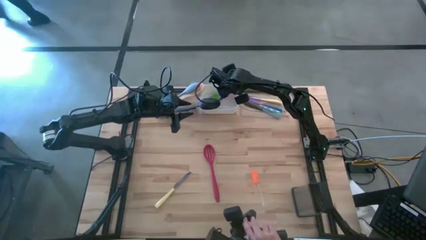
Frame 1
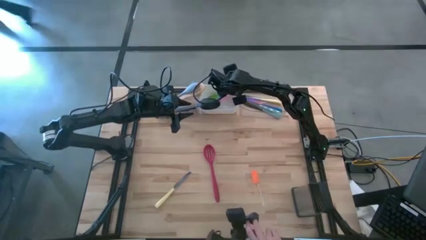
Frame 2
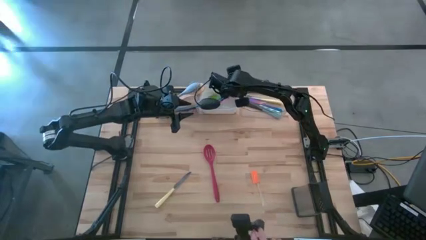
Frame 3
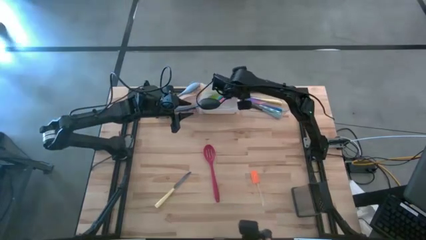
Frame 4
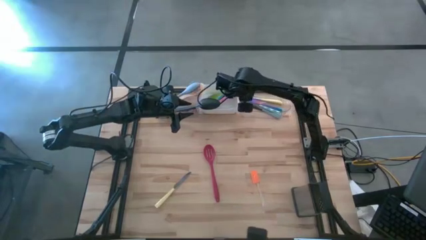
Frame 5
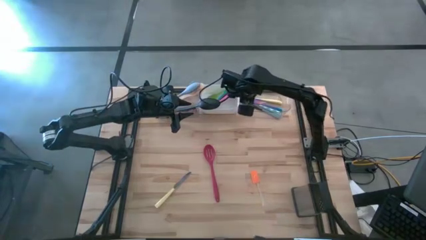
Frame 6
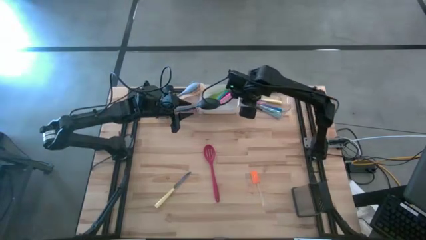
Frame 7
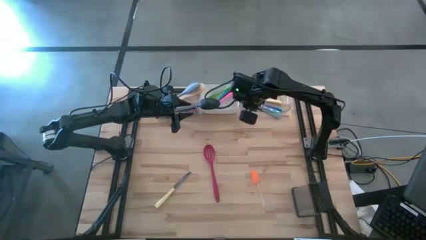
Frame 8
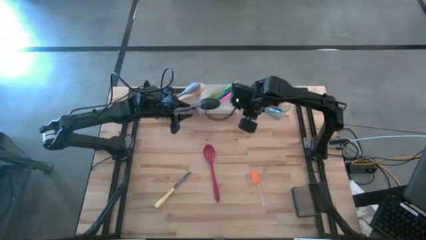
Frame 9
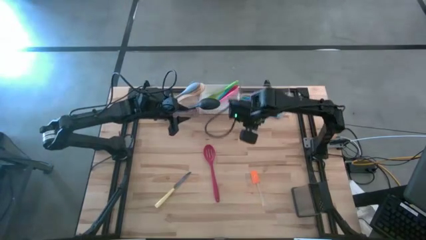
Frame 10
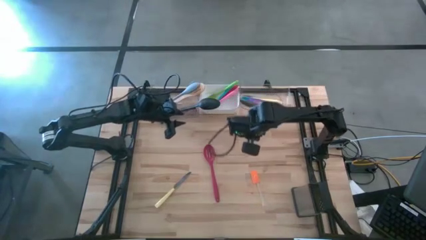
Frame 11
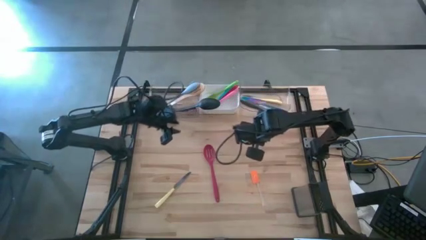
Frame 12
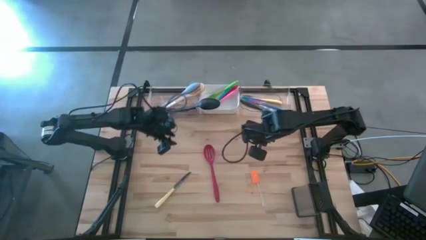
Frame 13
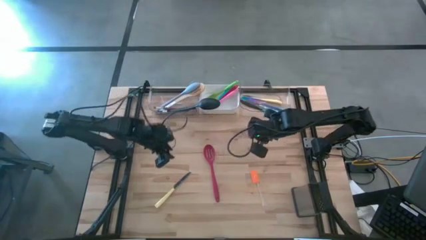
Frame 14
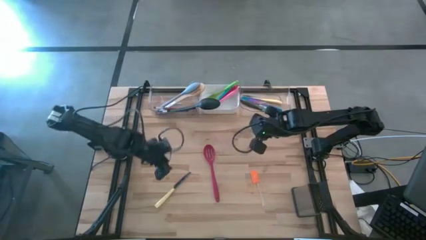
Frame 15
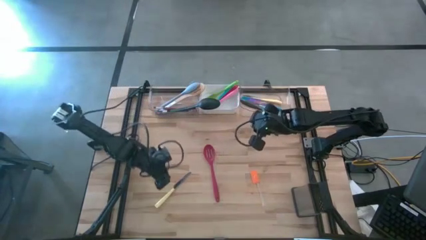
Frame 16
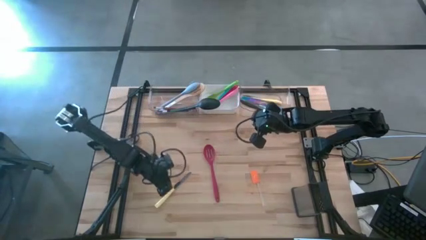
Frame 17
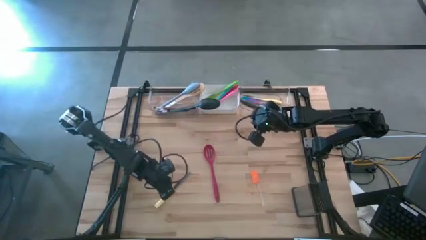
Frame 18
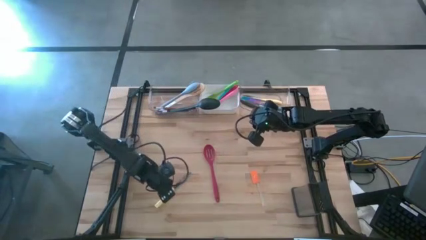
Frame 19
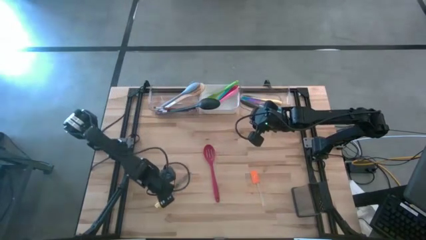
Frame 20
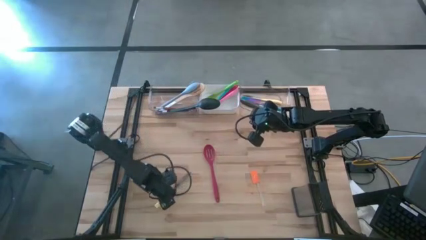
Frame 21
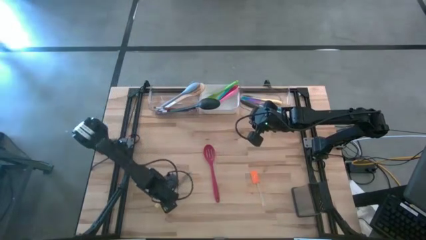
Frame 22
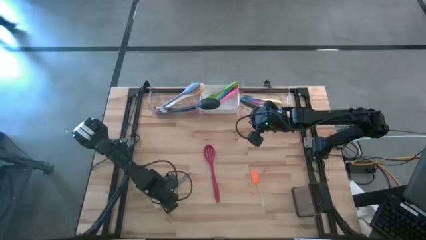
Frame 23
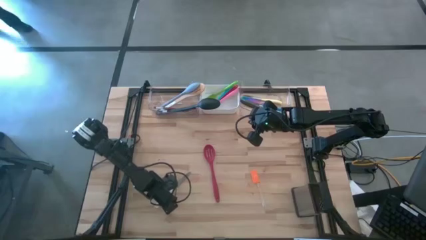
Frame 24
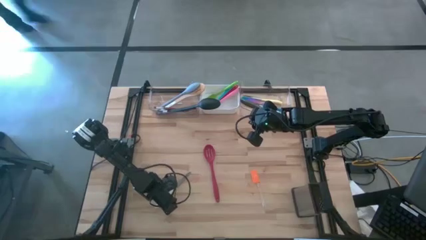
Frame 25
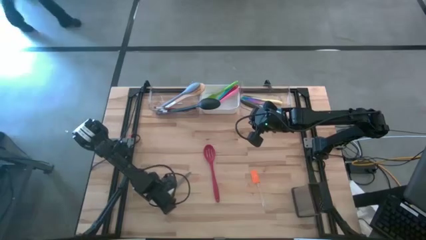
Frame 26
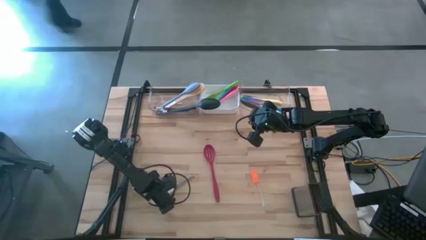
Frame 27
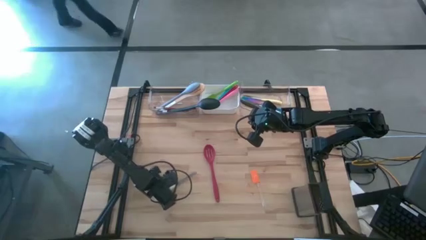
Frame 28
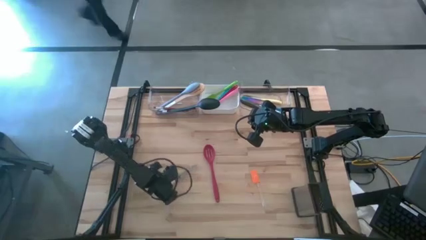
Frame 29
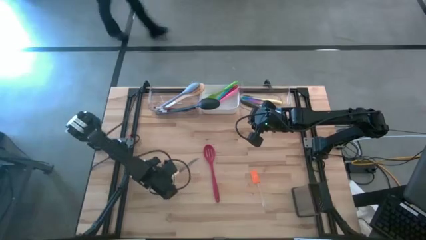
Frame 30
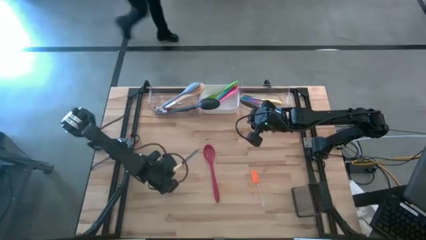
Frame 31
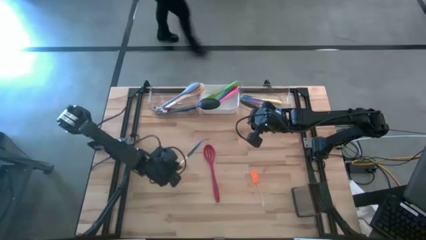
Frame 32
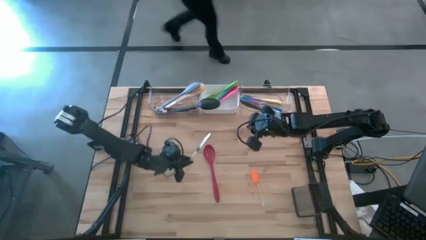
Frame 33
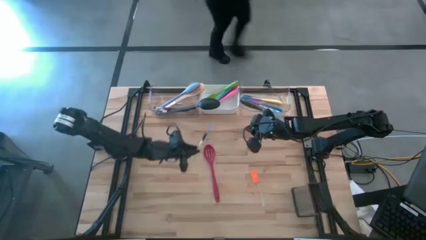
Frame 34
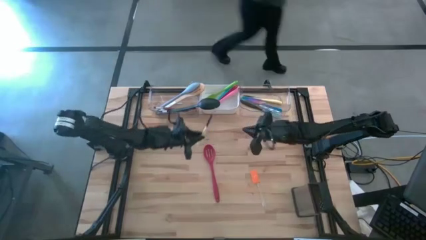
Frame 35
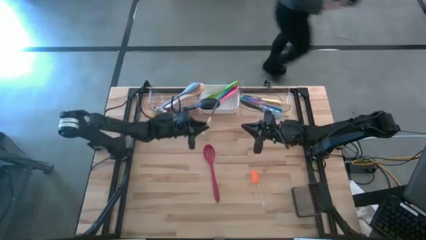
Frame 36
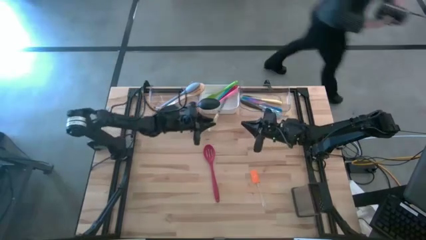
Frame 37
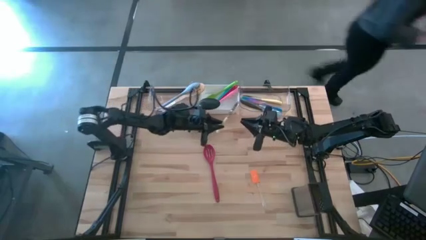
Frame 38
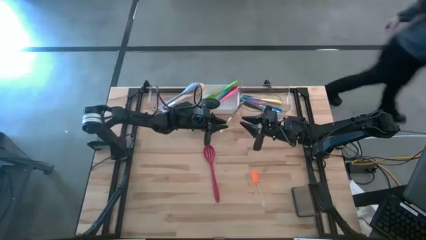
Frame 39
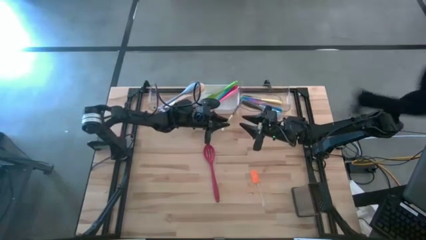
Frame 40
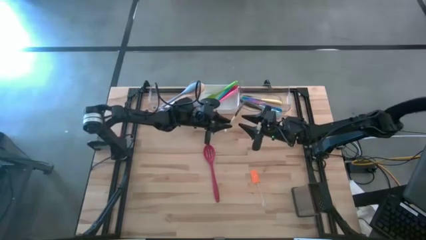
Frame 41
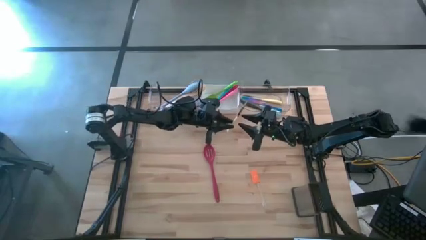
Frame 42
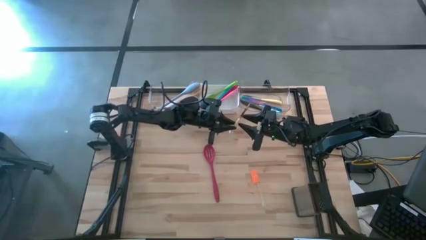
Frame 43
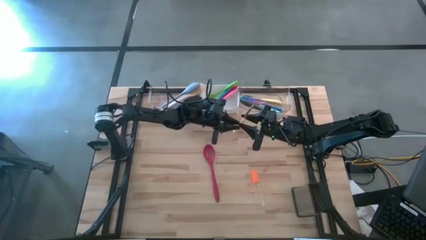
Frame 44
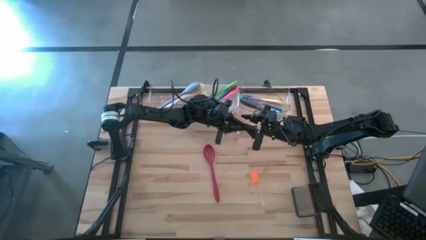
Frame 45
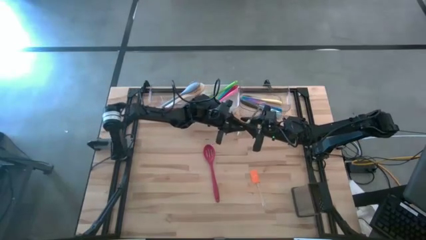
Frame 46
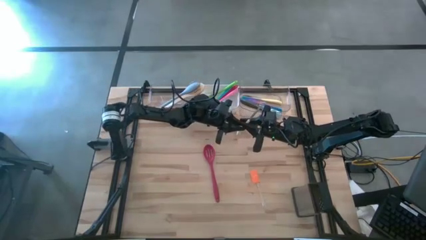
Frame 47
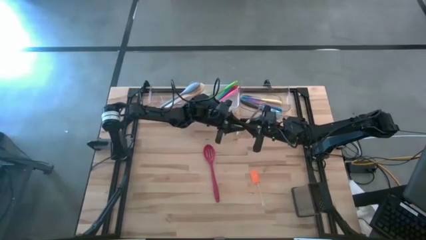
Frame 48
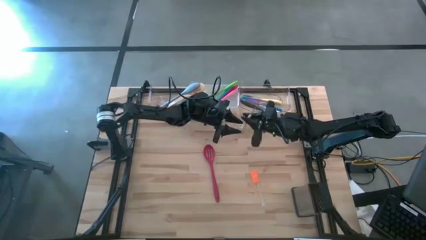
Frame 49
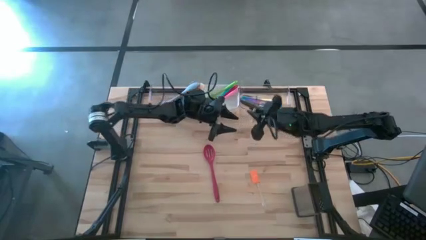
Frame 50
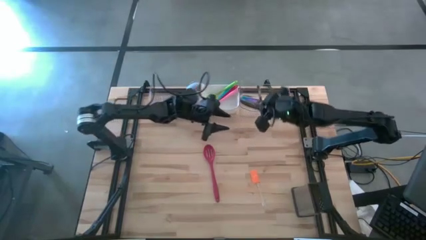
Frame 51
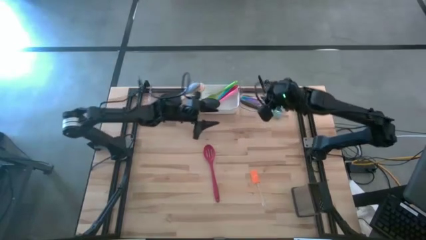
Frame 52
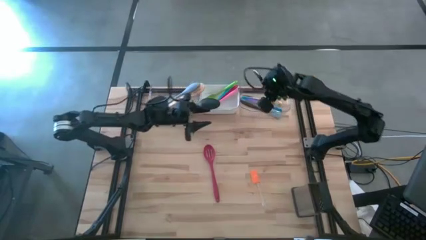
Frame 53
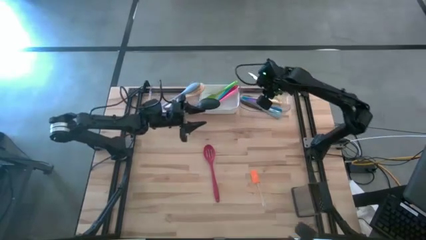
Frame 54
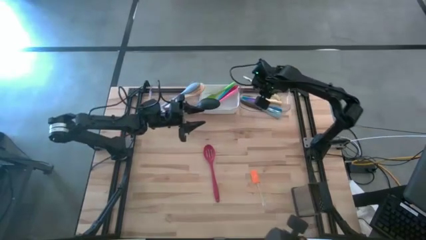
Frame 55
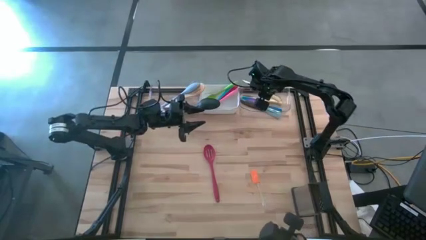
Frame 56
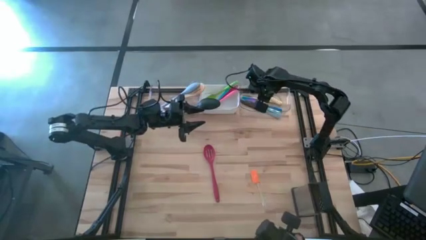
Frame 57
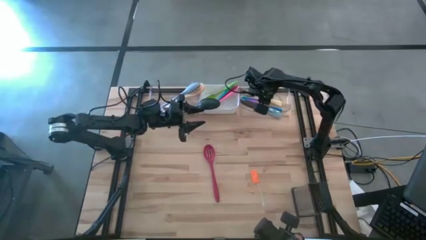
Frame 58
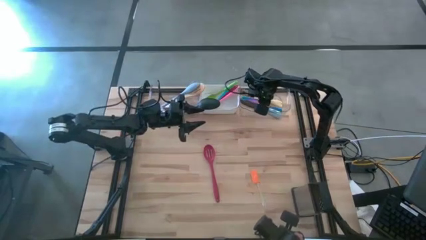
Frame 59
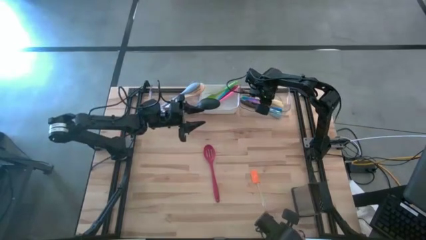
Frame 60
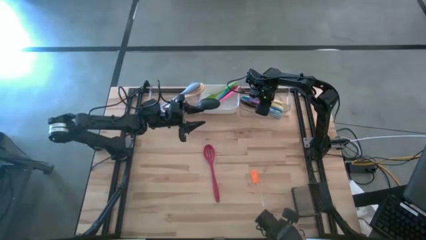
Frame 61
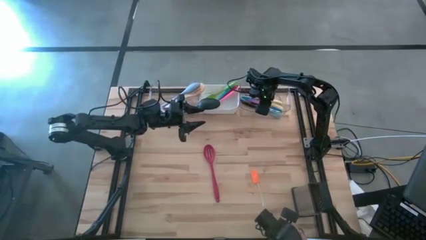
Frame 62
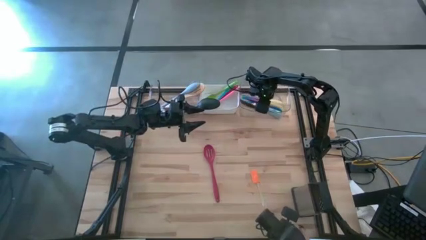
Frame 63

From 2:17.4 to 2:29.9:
Task: Pick & Place Kitchen Items
Put the yellow table knife into the right transparent bin

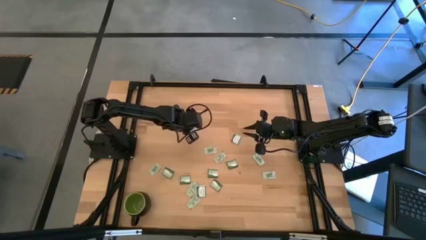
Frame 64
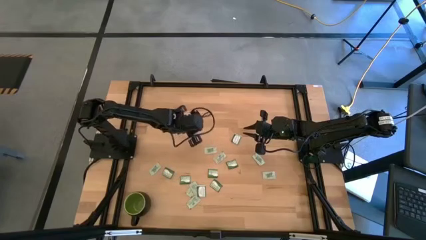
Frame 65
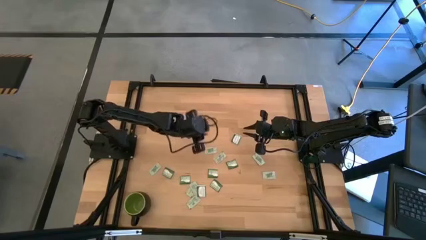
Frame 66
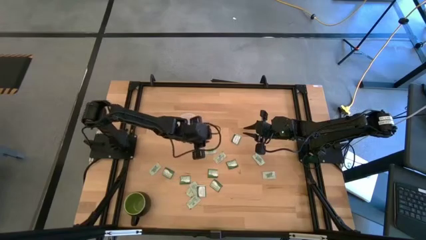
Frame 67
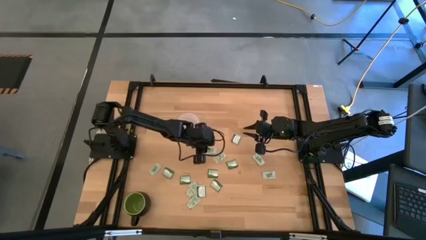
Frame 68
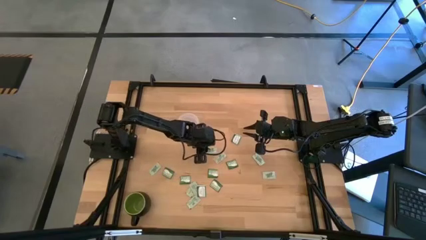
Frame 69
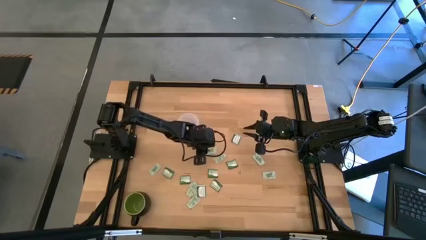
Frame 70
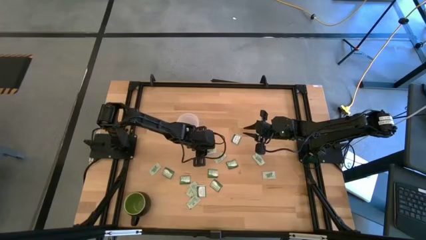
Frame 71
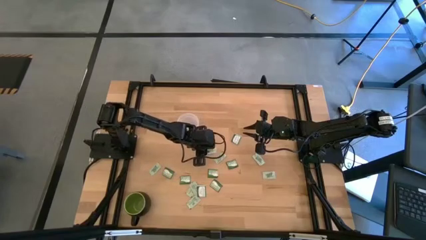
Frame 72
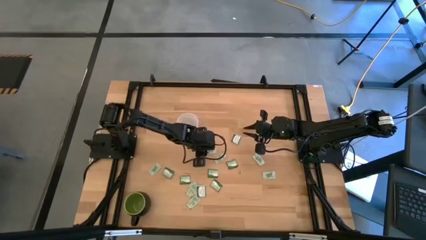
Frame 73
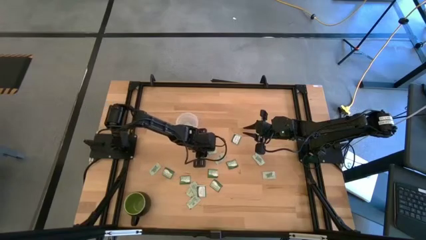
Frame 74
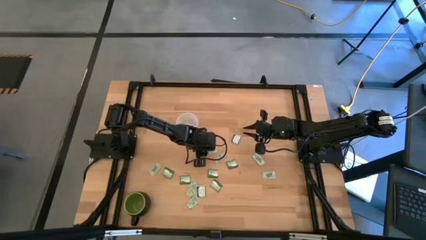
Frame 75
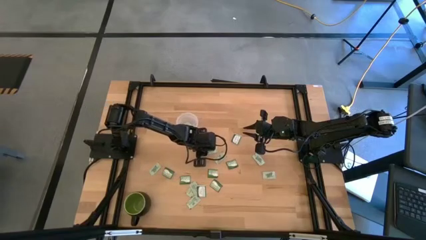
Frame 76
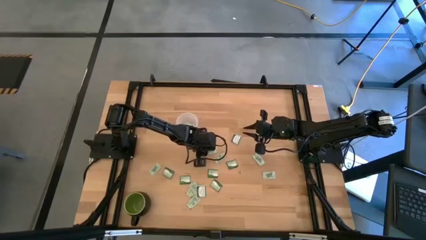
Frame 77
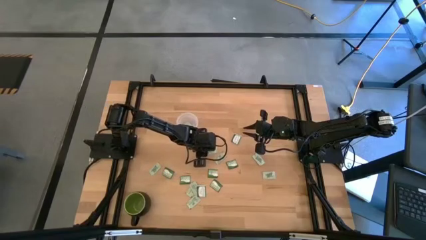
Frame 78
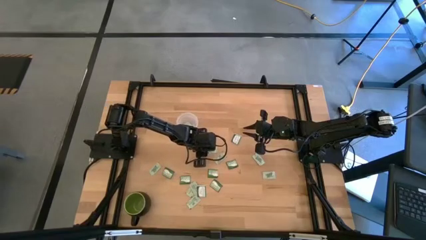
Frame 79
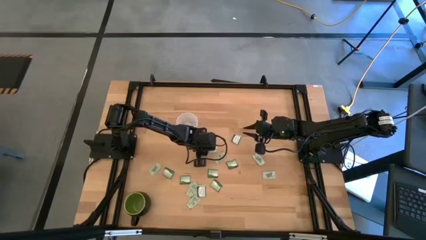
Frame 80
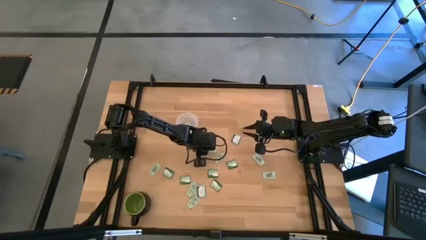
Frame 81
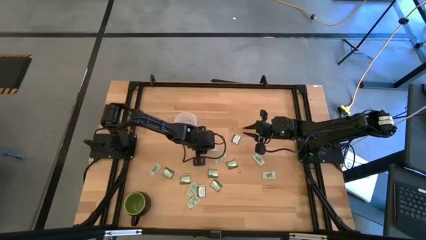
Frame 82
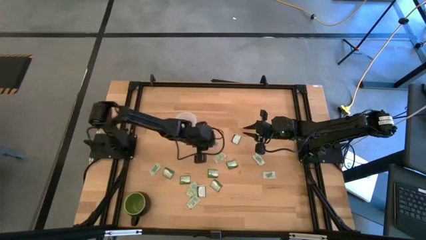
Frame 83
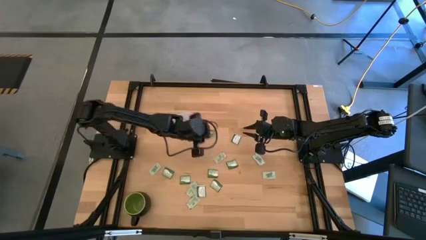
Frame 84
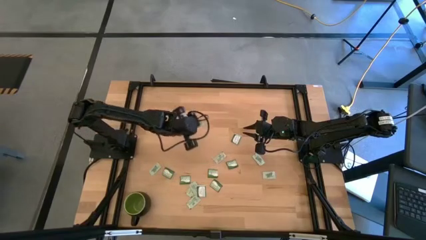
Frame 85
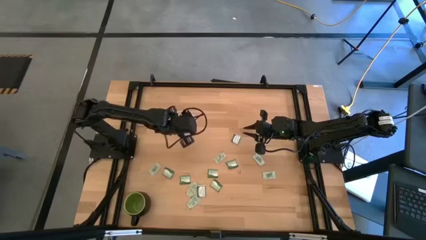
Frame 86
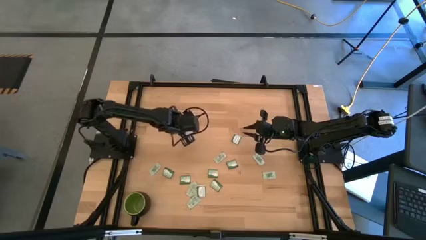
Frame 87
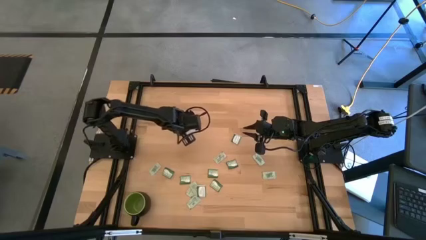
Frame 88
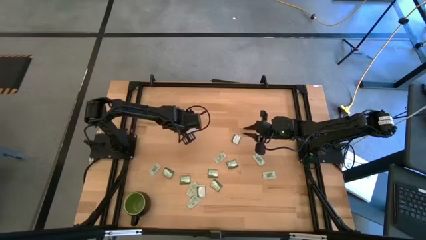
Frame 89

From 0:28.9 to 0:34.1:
Task: Pick and place Stevia / Truvia into bins
Put the light green stevia packet into the transparent container
